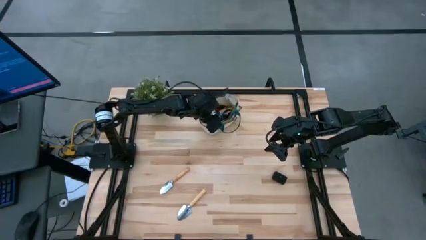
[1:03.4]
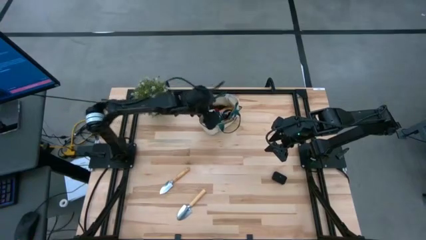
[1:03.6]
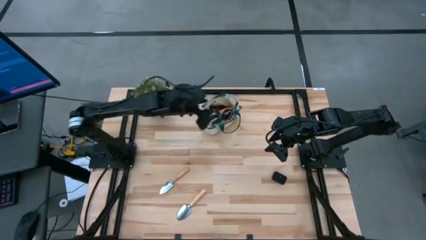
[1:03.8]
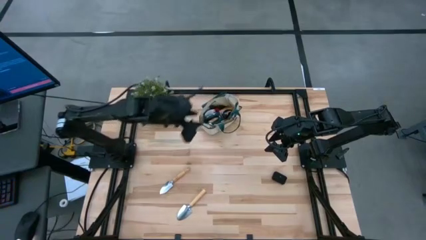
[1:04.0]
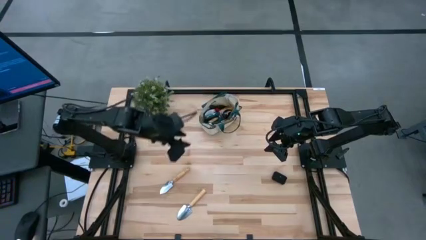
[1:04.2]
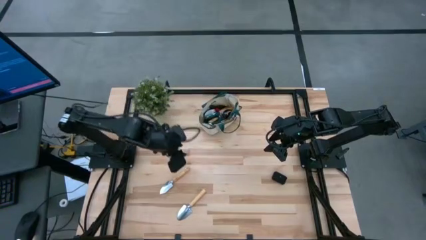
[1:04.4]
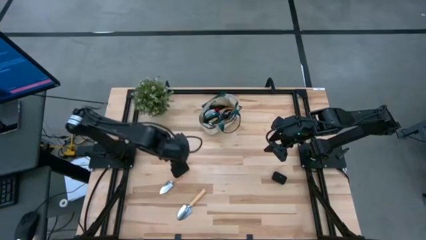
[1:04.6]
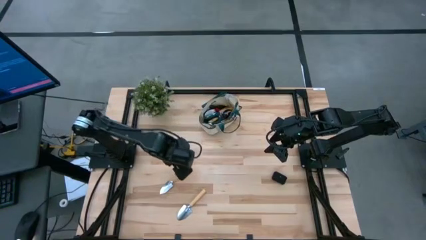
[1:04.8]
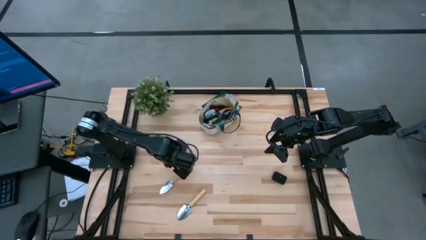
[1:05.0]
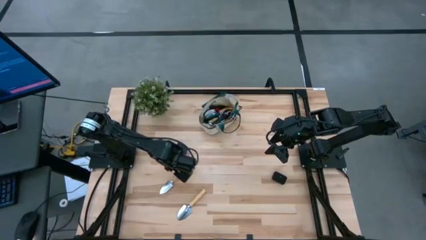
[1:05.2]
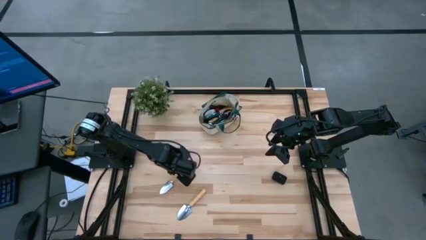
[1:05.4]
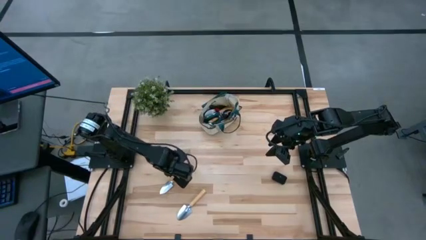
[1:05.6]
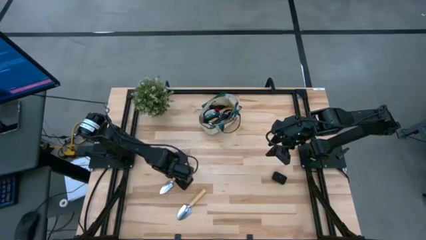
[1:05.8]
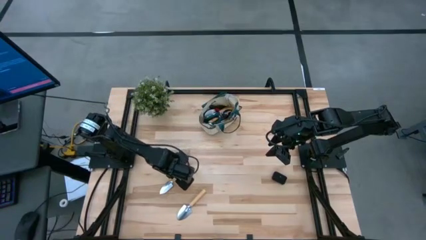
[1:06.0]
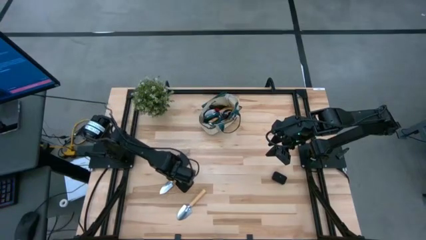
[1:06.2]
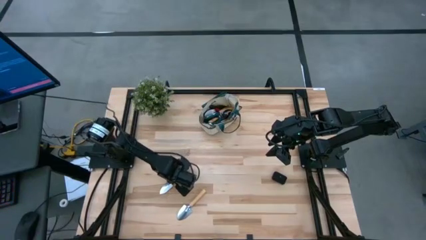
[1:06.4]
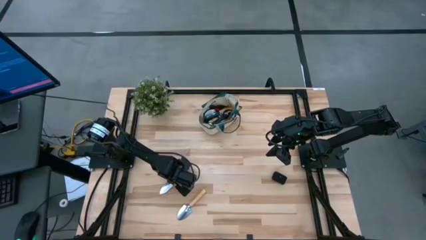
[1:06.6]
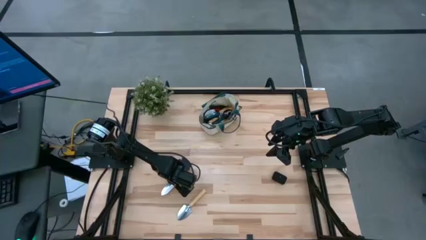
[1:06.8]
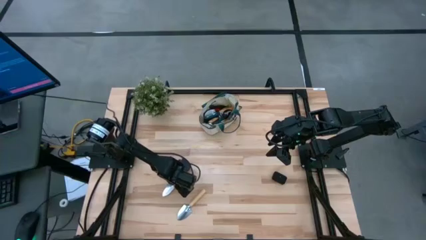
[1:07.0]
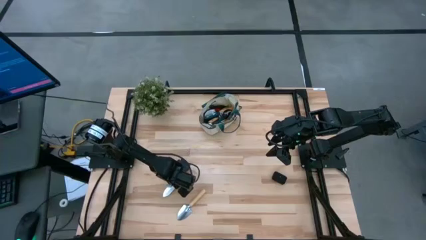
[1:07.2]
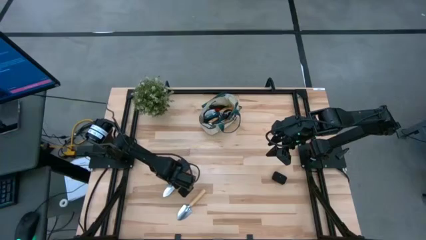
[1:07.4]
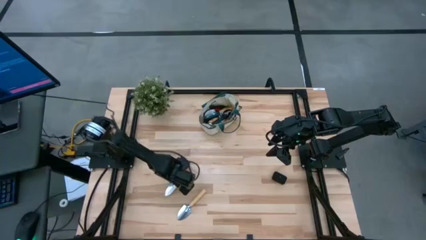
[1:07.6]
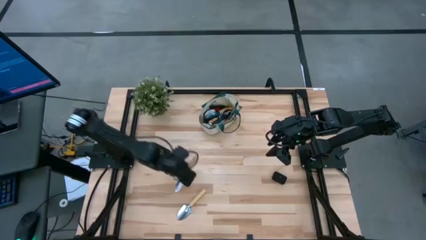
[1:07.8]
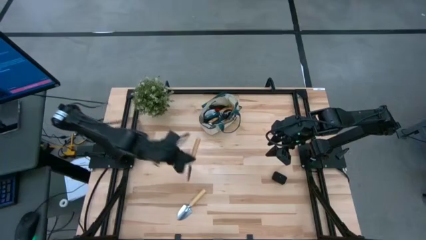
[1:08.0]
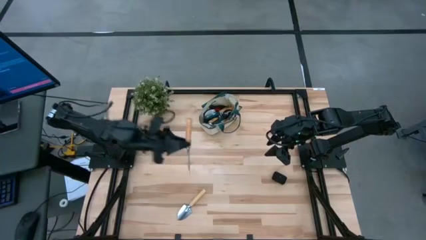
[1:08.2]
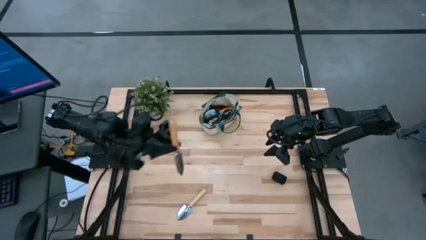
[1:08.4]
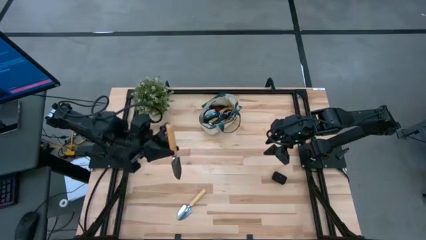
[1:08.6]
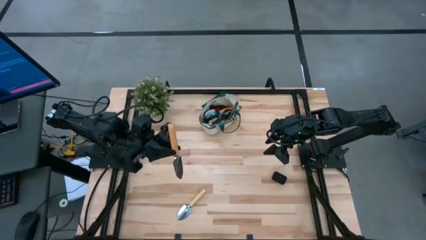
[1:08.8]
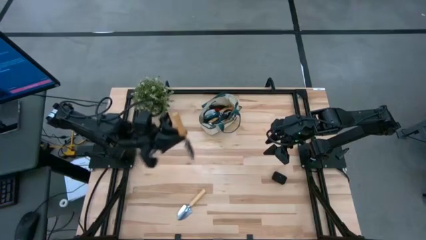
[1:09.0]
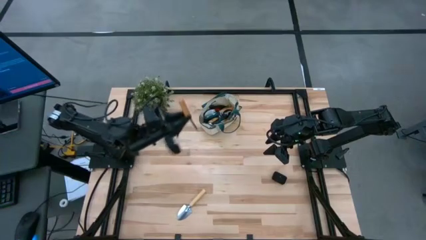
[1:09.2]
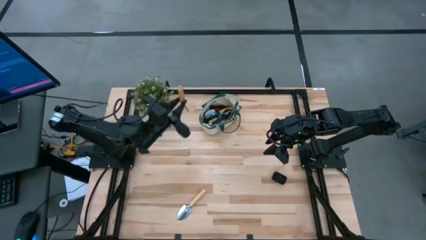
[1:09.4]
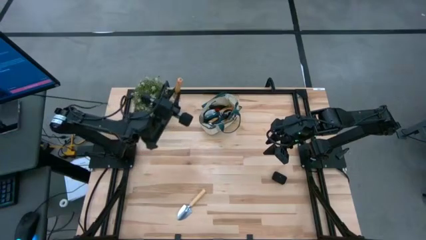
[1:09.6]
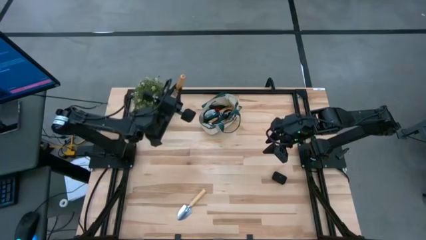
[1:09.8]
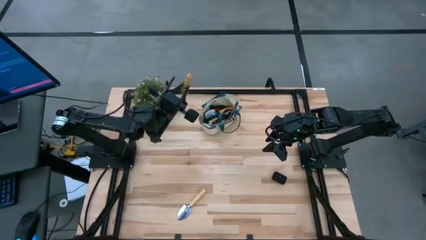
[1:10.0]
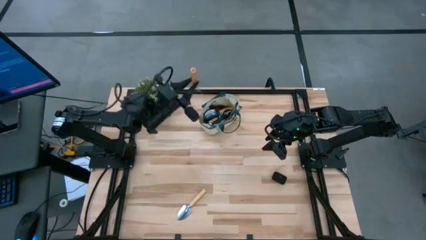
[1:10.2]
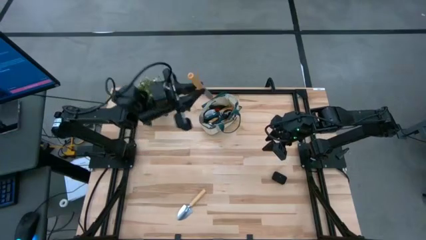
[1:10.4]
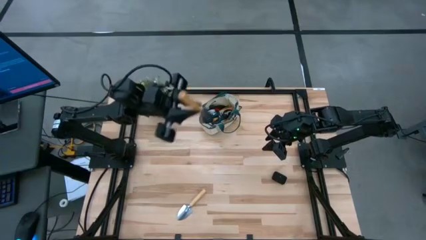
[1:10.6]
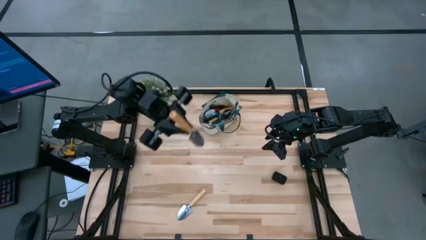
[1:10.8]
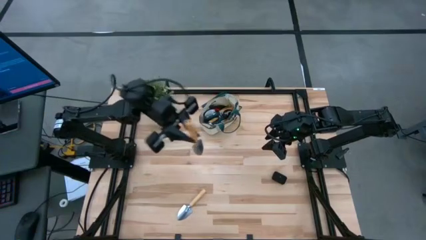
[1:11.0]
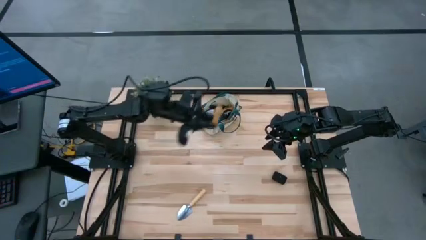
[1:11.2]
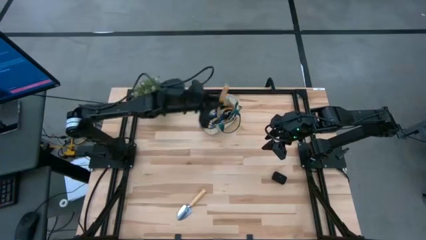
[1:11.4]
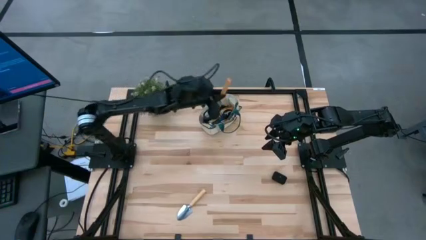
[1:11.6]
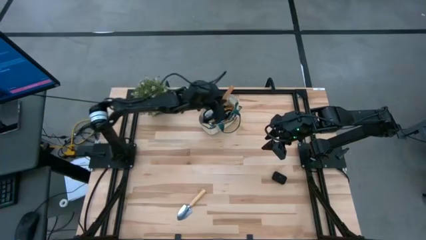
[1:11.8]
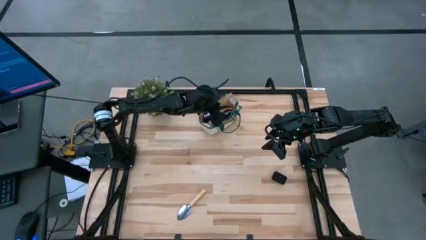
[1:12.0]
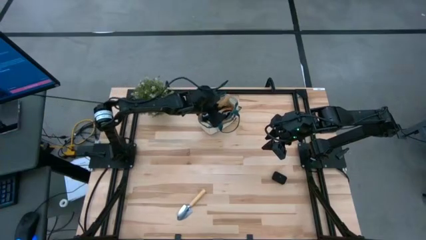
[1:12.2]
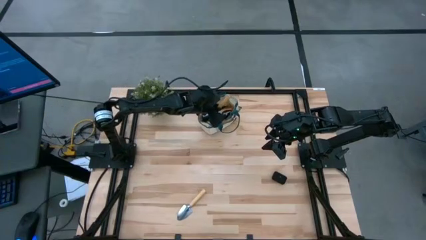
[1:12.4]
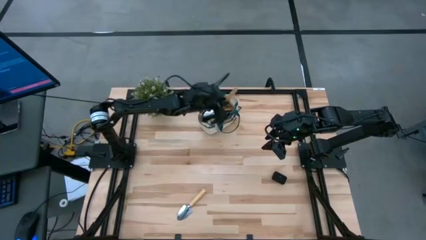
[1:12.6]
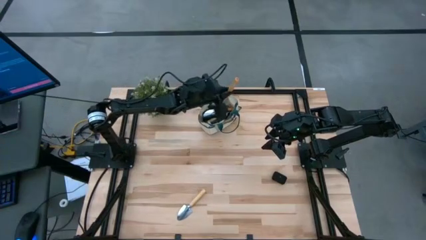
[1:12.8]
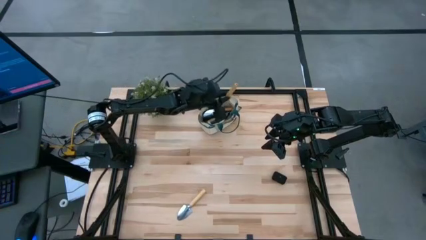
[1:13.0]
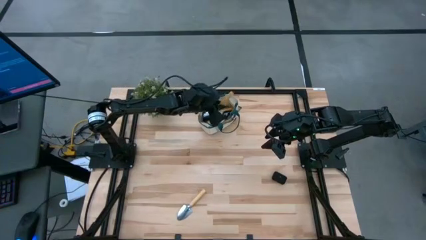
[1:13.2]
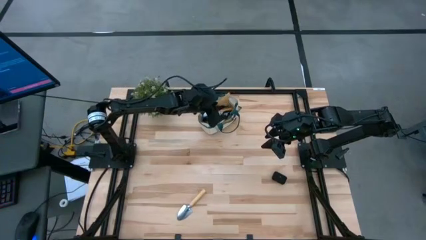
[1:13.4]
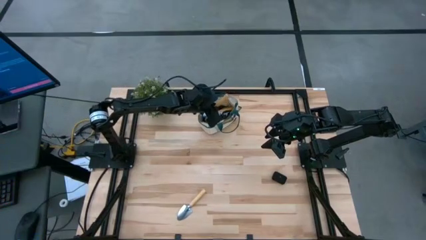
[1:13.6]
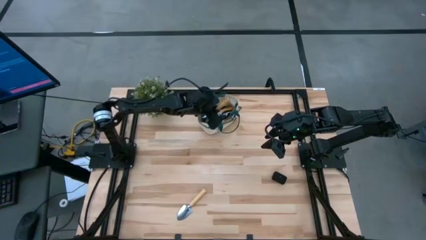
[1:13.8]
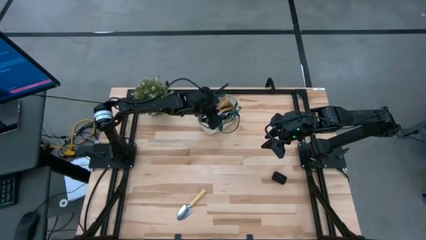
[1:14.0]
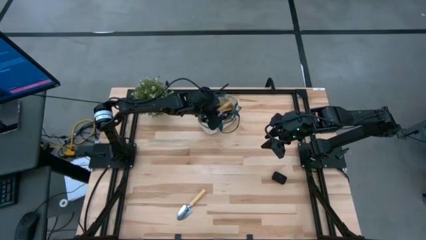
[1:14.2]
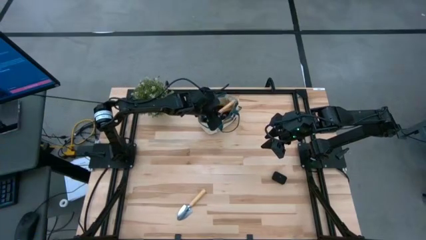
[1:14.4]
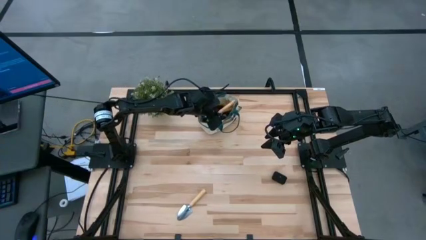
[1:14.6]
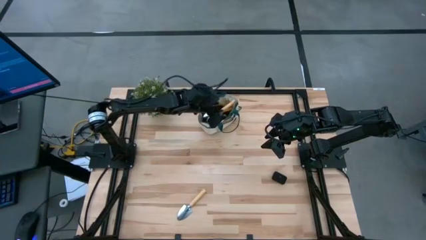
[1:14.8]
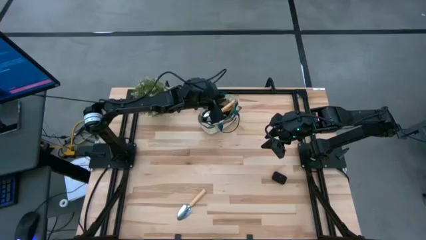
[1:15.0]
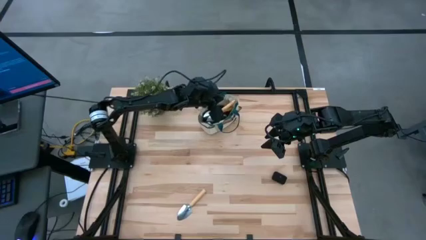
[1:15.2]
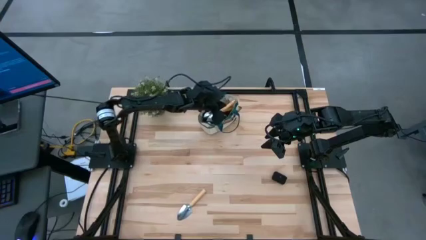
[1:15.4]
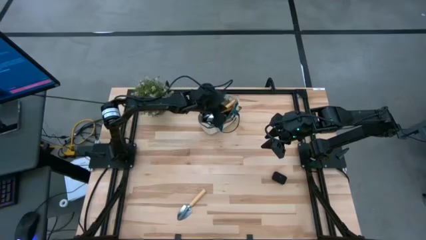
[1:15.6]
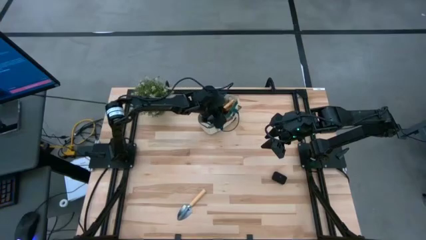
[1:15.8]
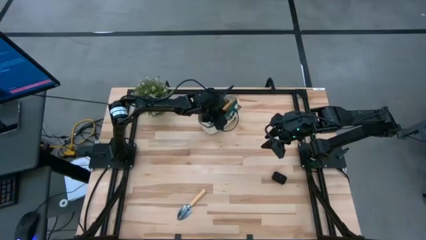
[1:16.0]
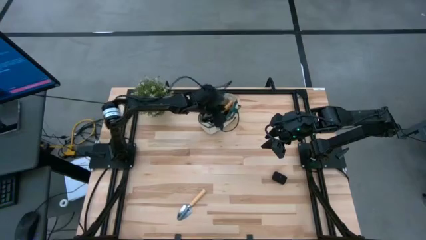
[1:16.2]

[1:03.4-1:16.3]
Task: Pick & Place Garden tools in Gardening bag
Put the brown trowel into the light brown gardening bag
